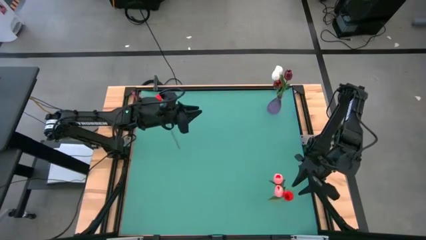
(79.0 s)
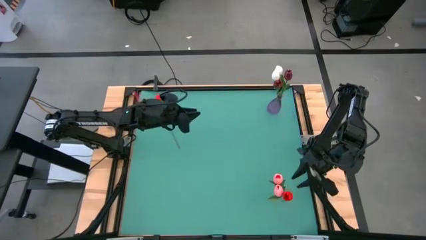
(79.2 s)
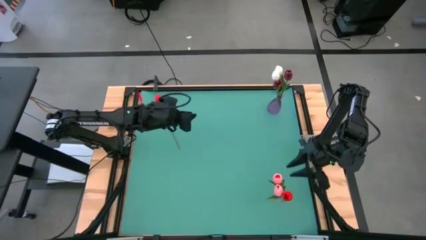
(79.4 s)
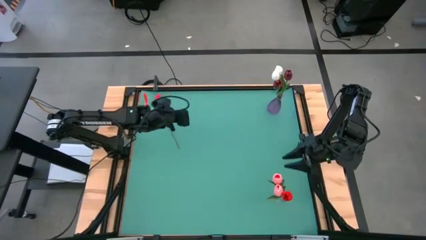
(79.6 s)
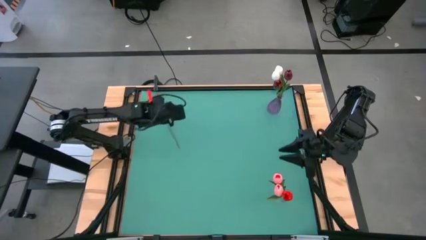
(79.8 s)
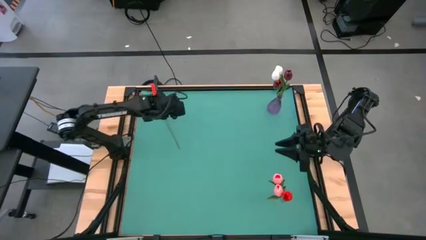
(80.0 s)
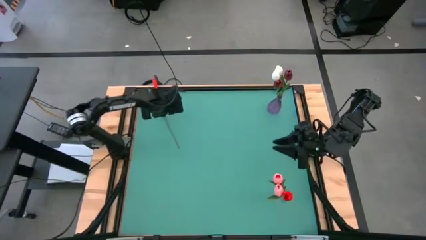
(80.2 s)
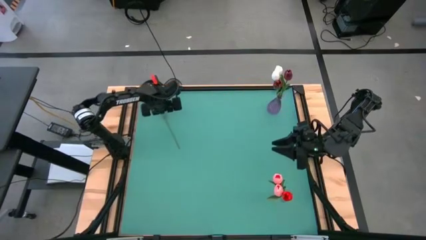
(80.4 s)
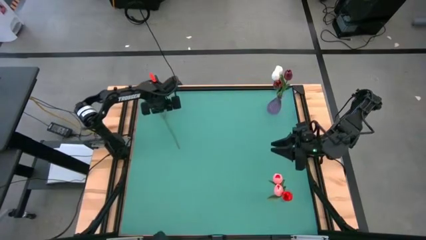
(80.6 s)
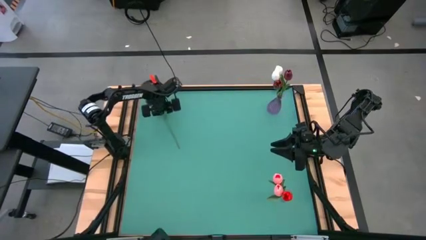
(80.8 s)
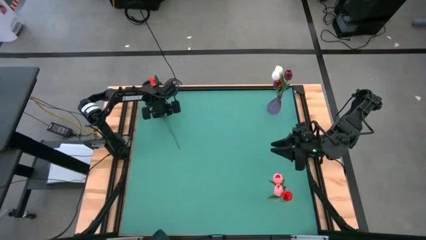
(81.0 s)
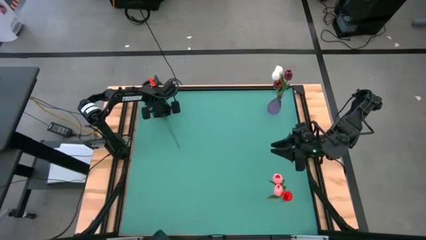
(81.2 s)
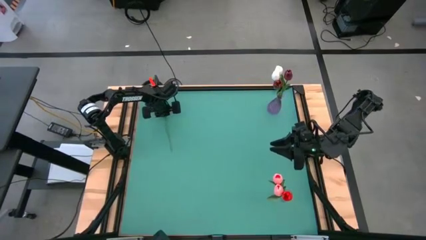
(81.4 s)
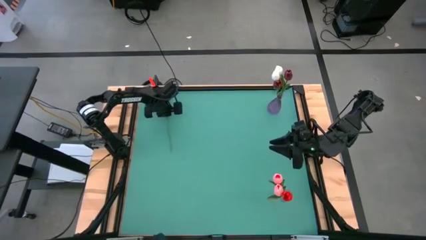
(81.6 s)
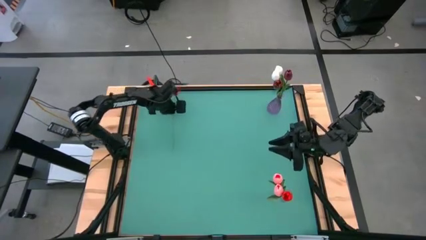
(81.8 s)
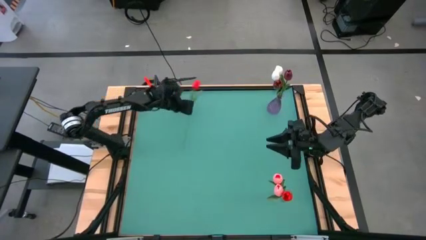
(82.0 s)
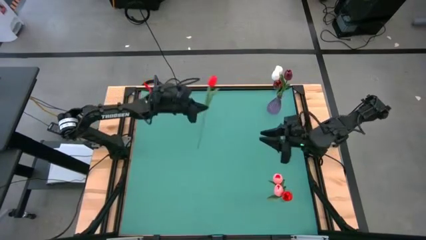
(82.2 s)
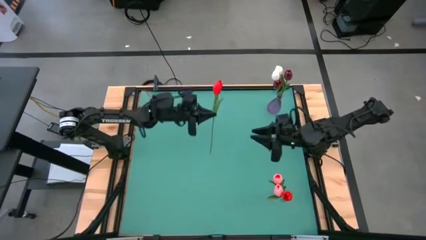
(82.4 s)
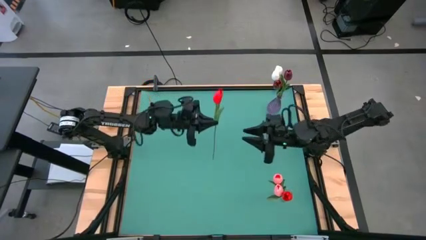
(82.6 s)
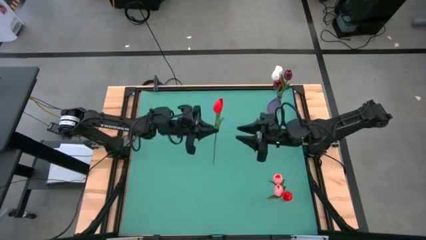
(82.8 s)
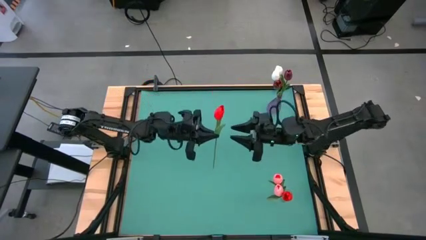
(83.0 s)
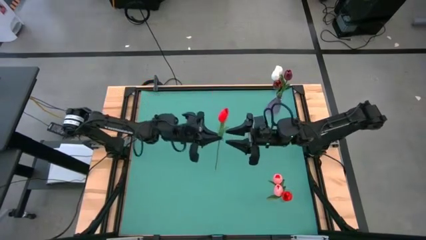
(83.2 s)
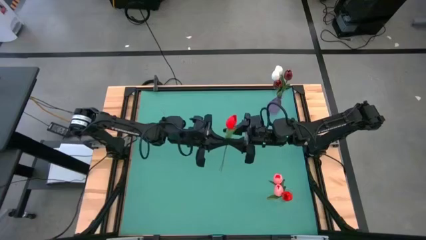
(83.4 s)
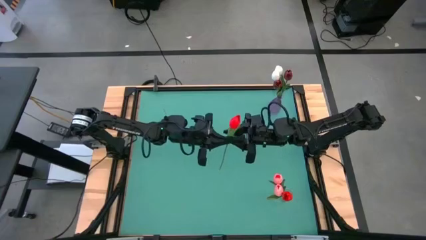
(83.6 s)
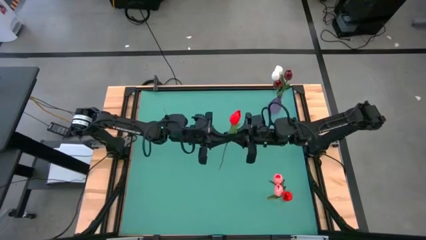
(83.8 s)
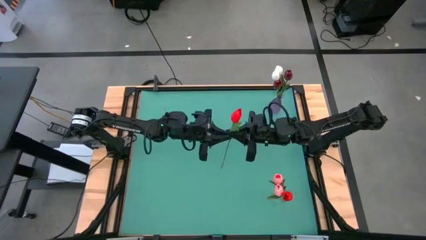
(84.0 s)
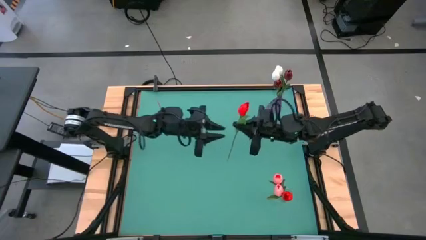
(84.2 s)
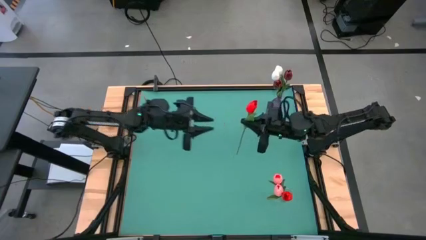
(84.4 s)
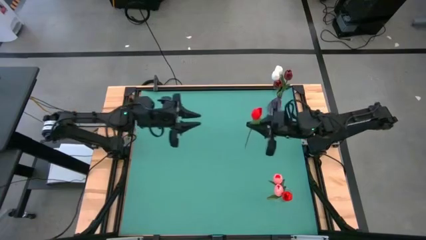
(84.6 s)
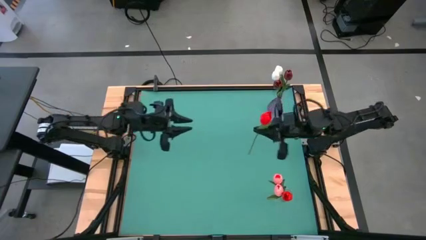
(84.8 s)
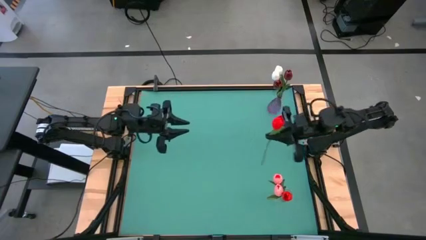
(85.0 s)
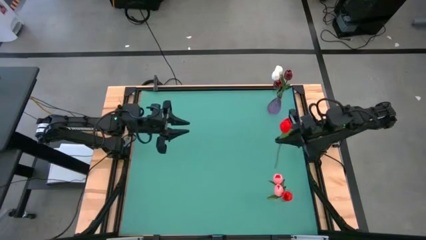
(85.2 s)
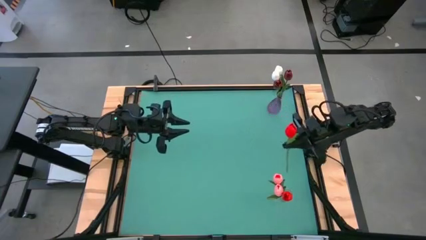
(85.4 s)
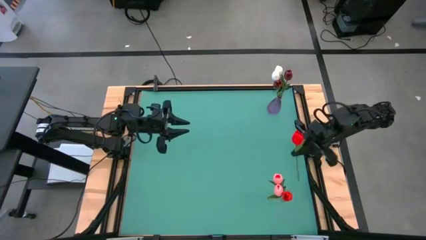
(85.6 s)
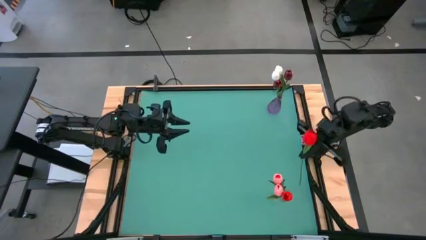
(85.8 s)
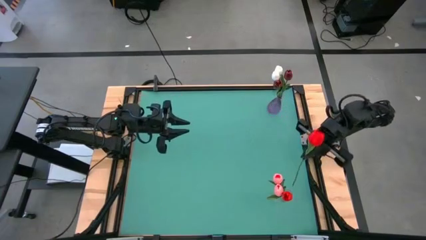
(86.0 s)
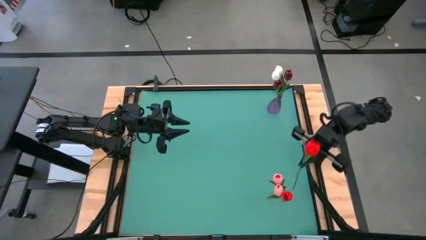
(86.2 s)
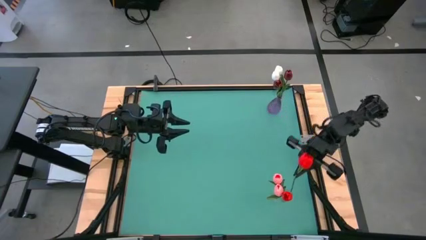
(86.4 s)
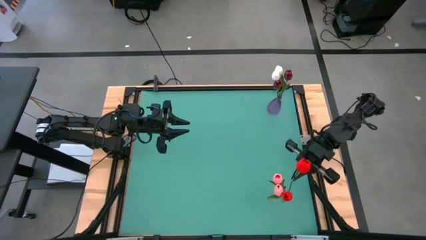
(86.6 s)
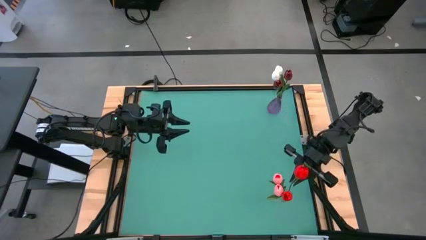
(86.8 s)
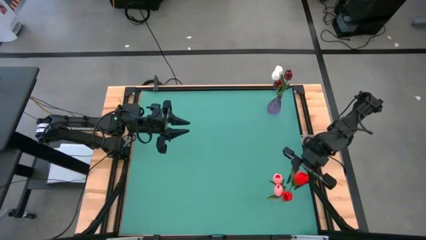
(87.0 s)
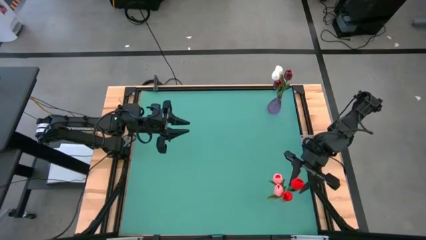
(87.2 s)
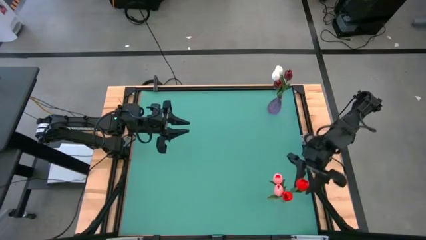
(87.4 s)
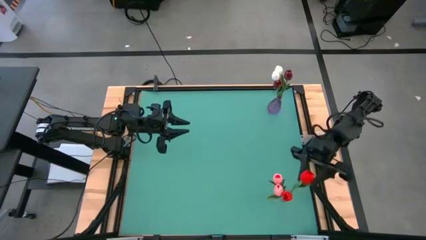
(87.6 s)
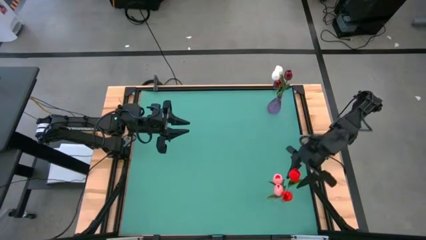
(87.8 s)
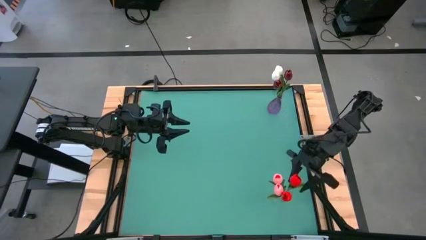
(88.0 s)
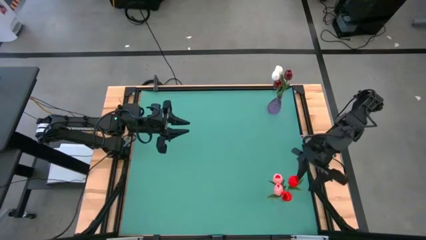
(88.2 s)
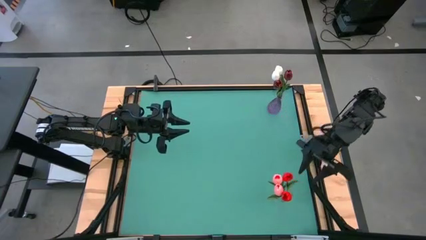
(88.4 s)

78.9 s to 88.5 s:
Task: Sort flowers into vase by color
Put the red flower into the transparent vase

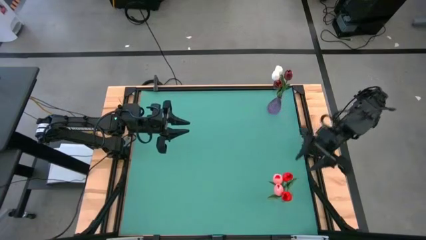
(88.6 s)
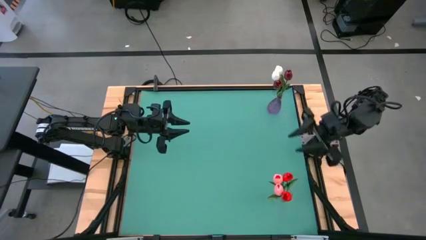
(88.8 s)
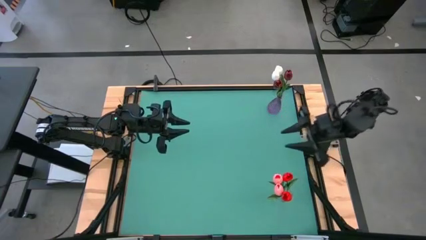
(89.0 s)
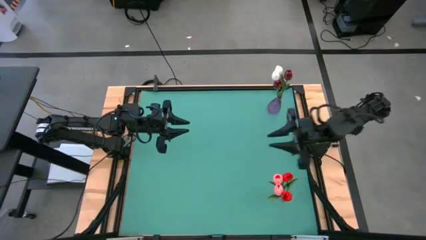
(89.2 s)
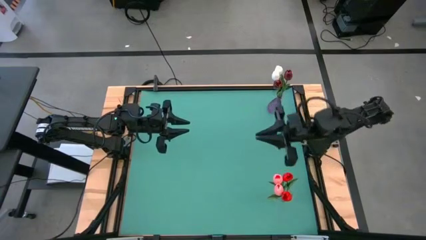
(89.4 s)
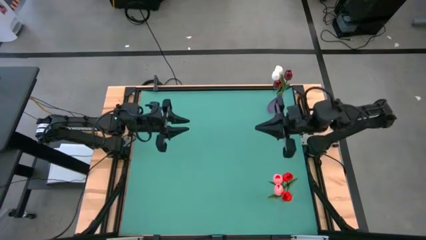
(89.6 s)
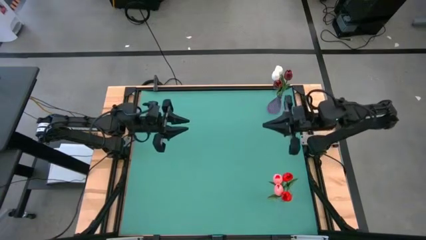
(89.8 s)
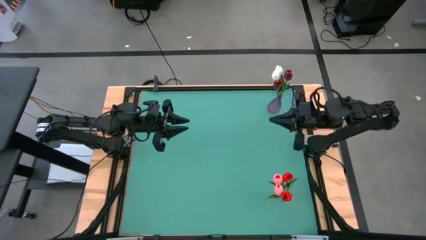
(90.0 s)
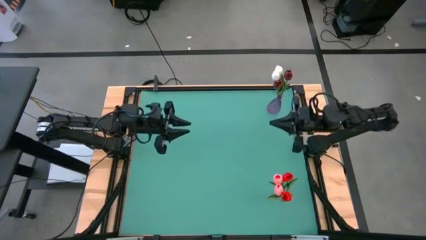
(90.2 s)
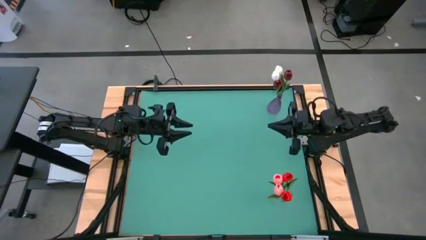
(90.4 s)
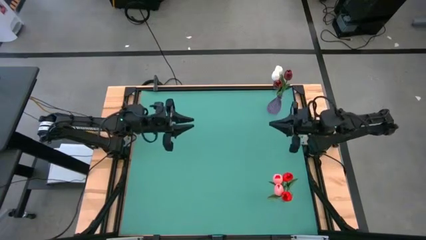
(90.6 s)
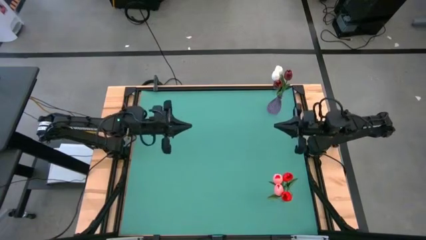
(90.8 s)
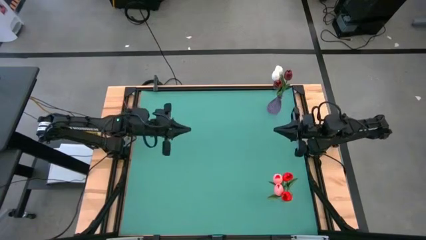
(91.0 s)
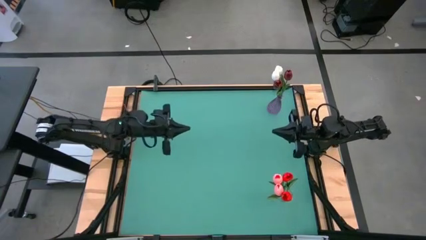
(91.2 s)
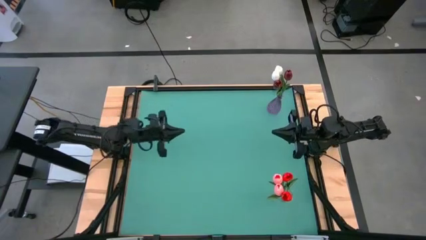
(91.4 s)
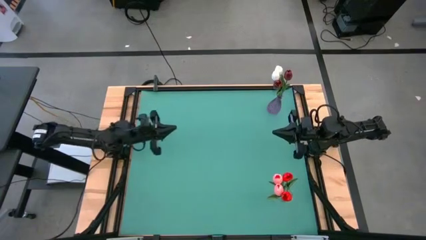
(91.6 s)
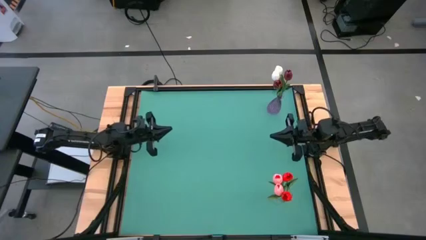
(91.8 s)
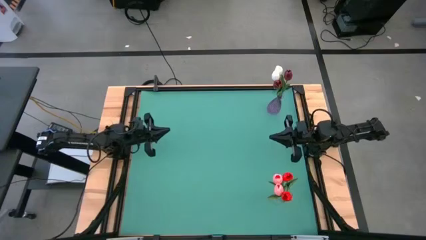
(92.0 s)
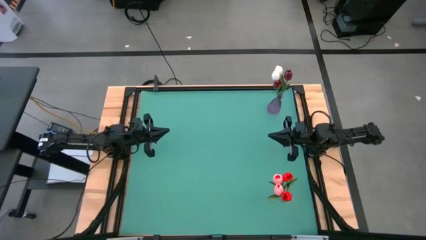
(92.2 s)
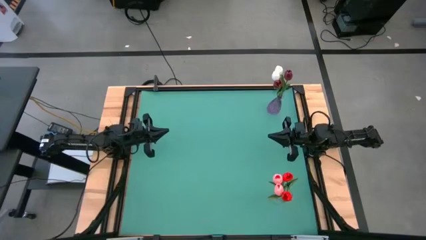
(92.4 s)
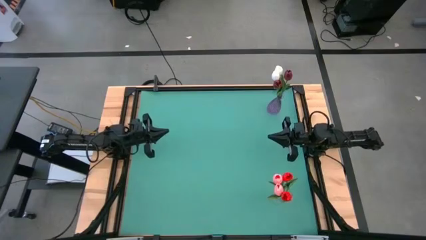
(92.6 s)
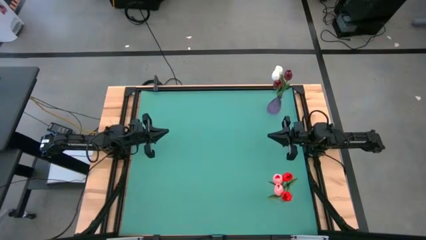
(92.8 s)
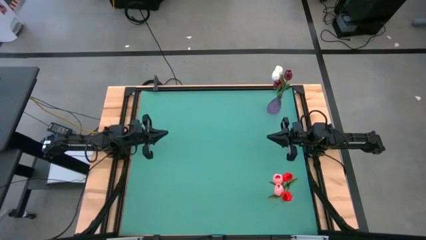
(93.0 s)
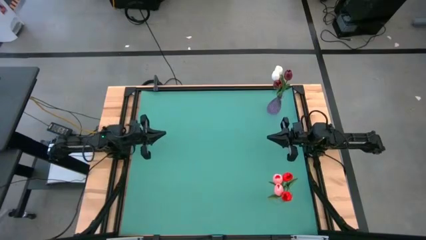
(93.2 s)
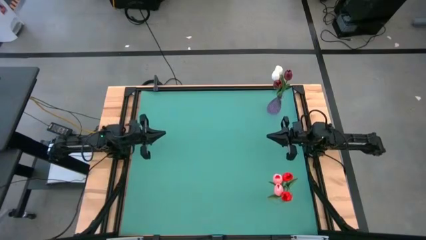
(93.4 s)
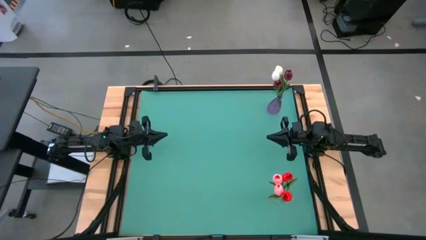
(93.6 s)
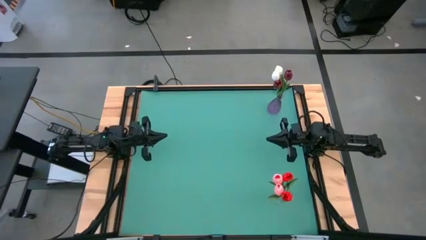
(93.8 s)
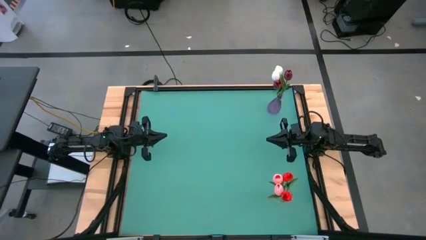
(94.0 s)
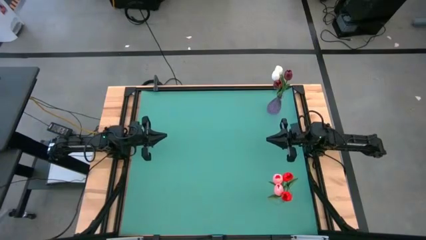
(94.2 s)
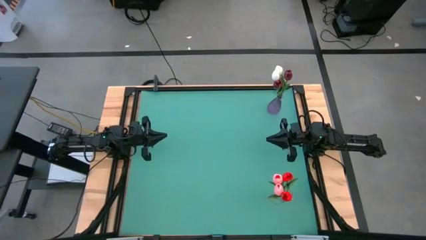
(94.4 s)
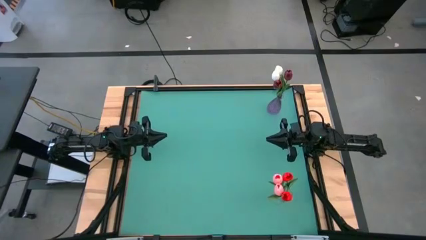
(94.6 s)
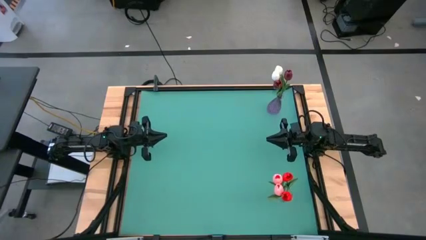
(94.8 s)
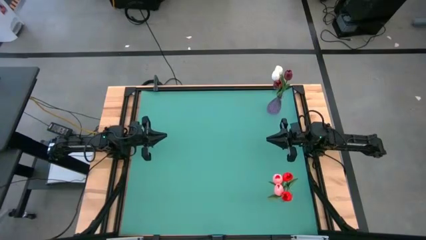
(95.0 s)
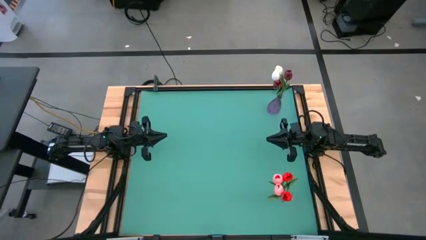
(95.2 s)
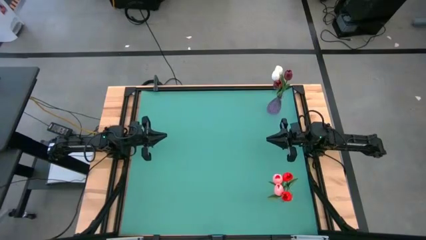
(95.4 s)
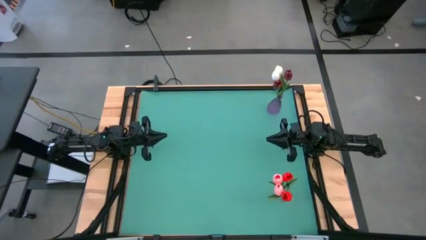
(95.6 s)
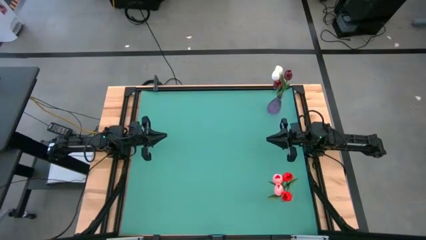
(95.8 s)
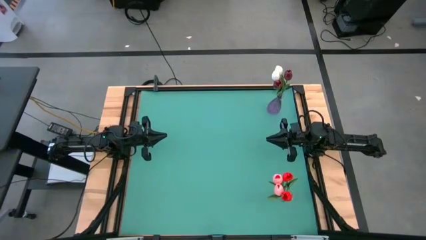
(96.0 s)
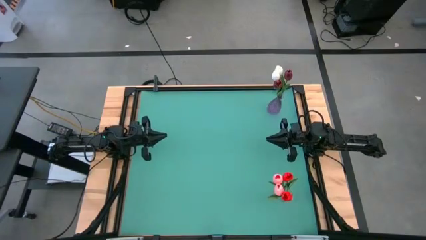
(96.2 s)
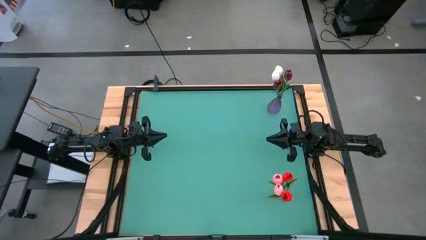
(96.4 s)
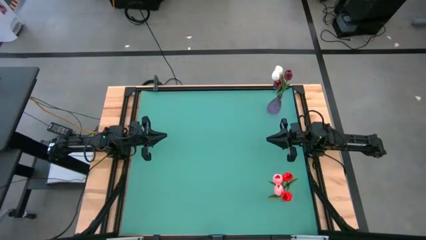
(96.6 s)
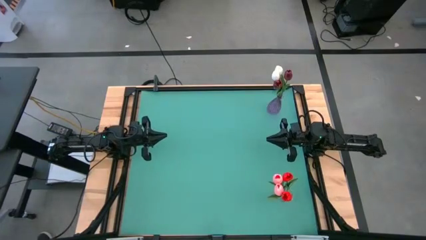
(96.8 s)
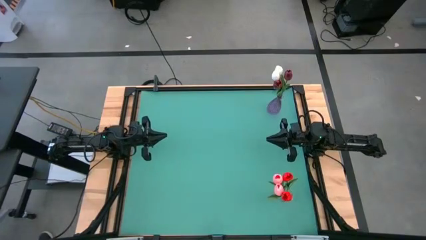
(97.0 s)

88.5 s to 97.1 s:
Return to Home Position
